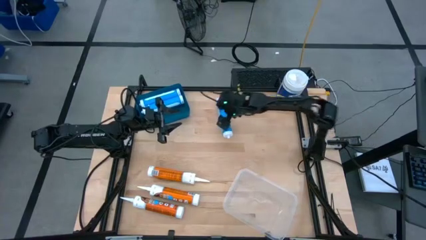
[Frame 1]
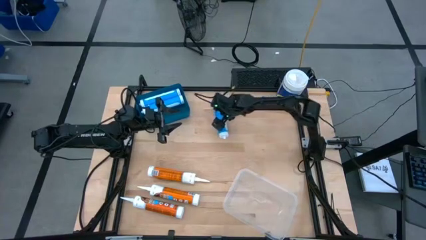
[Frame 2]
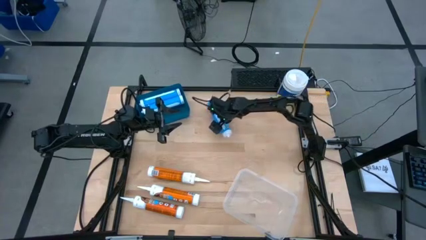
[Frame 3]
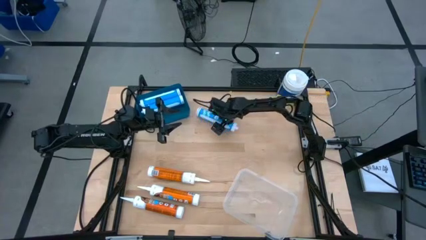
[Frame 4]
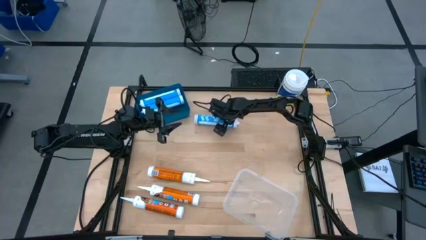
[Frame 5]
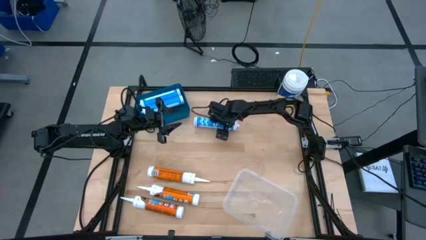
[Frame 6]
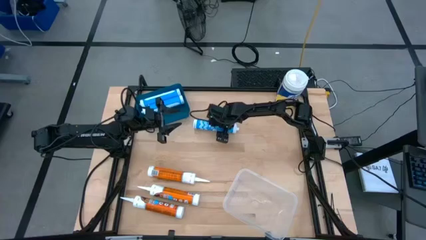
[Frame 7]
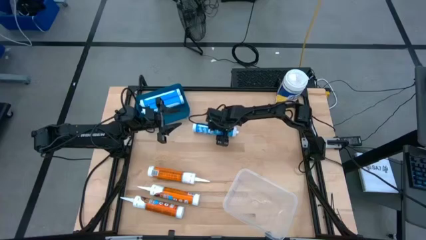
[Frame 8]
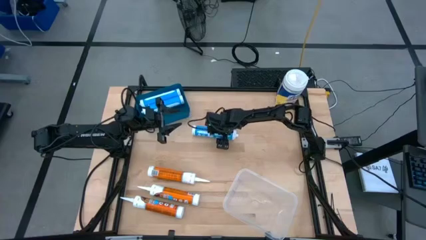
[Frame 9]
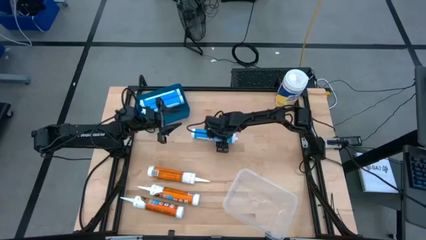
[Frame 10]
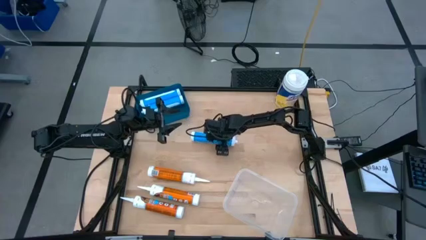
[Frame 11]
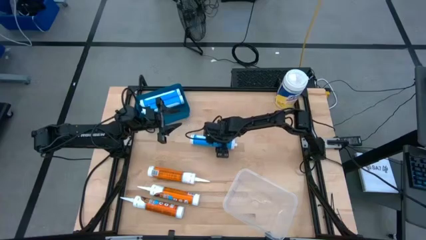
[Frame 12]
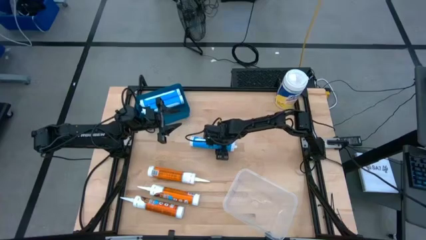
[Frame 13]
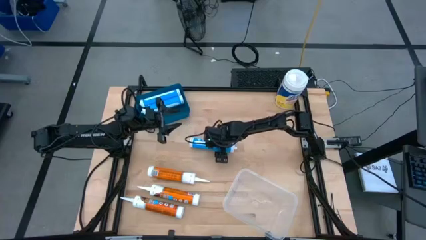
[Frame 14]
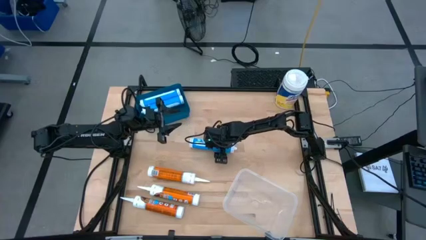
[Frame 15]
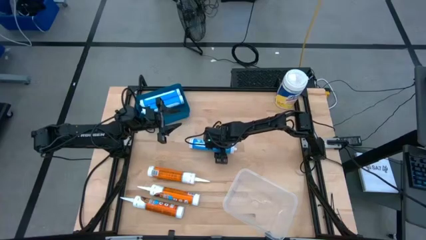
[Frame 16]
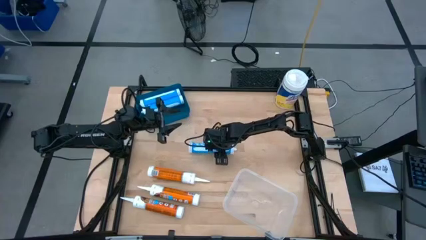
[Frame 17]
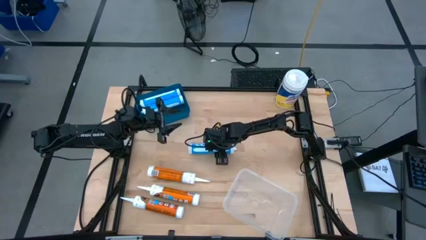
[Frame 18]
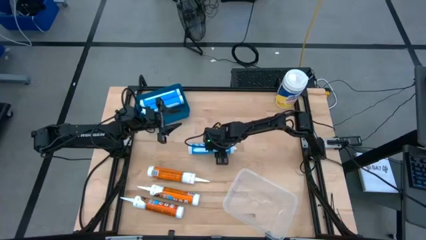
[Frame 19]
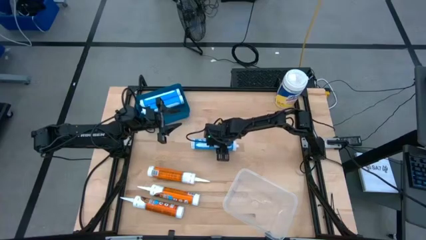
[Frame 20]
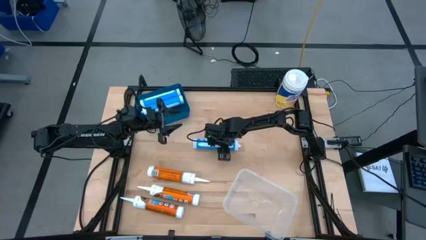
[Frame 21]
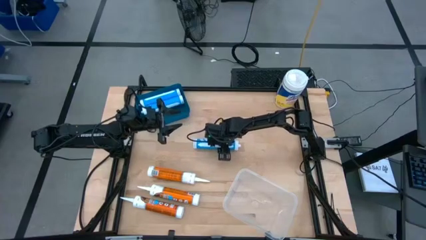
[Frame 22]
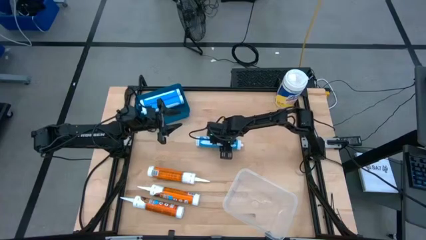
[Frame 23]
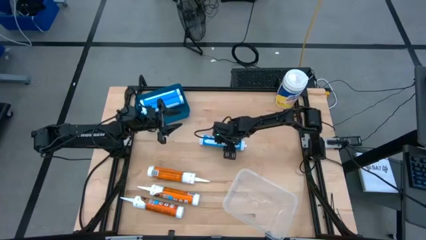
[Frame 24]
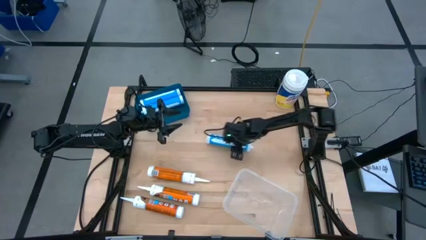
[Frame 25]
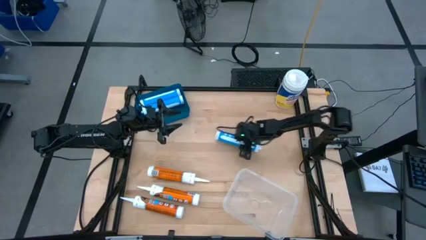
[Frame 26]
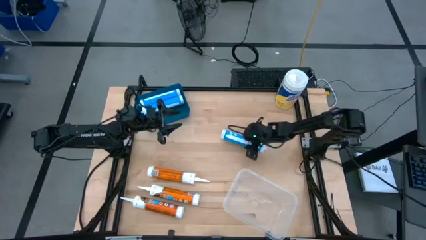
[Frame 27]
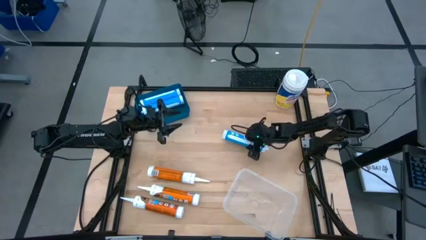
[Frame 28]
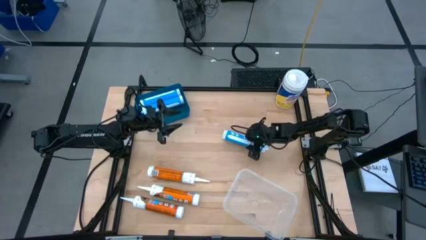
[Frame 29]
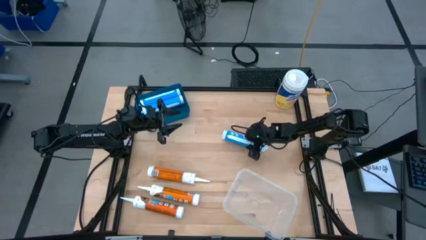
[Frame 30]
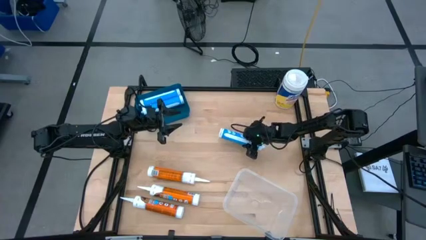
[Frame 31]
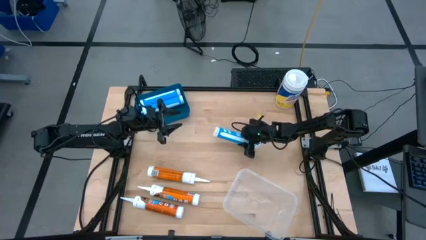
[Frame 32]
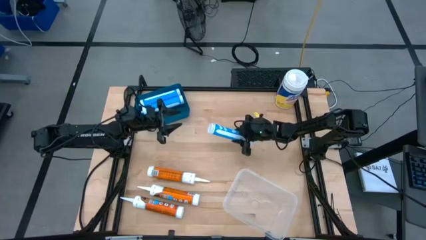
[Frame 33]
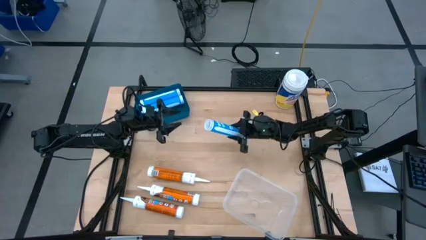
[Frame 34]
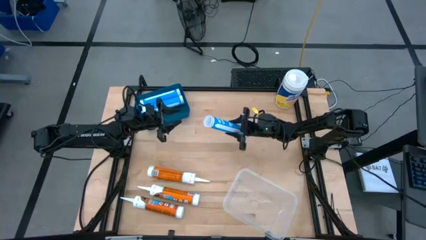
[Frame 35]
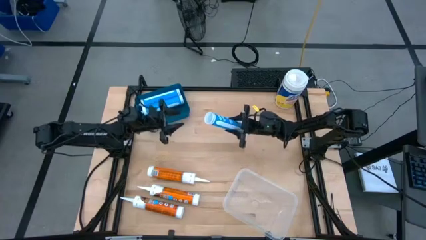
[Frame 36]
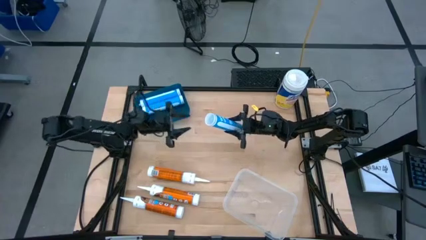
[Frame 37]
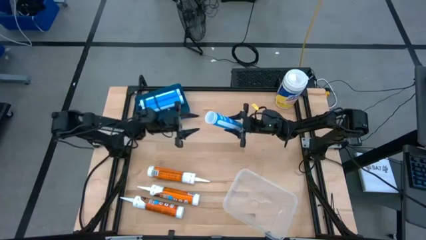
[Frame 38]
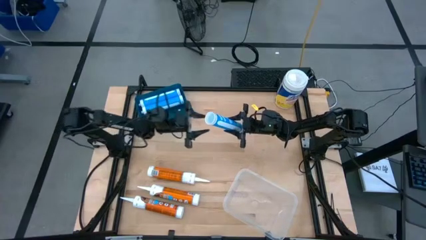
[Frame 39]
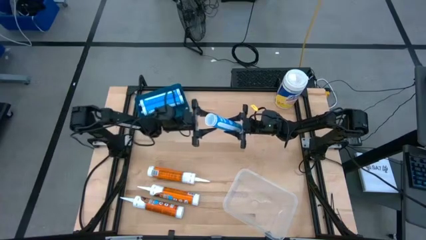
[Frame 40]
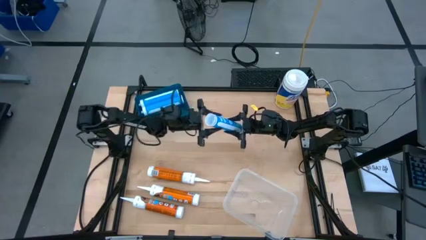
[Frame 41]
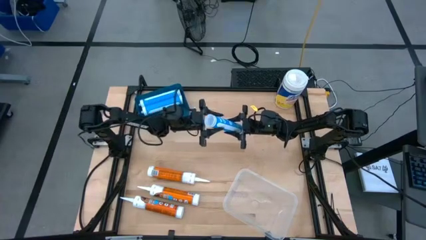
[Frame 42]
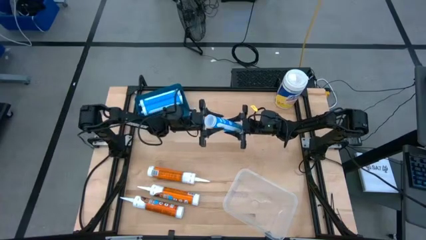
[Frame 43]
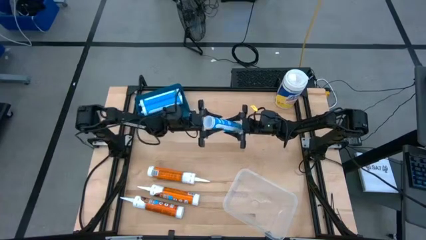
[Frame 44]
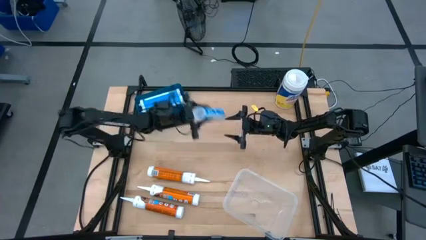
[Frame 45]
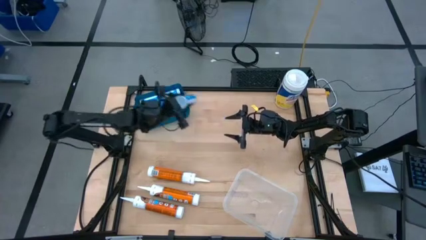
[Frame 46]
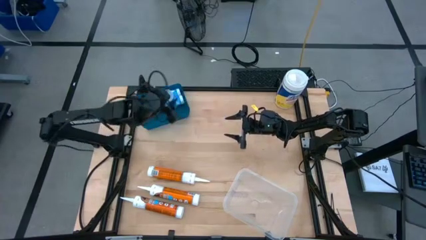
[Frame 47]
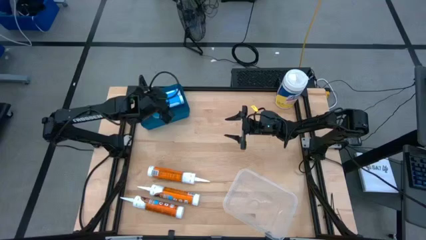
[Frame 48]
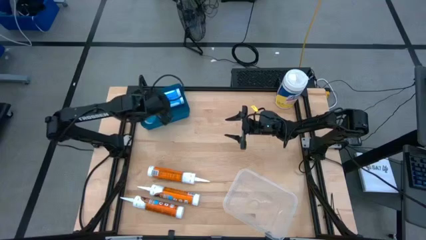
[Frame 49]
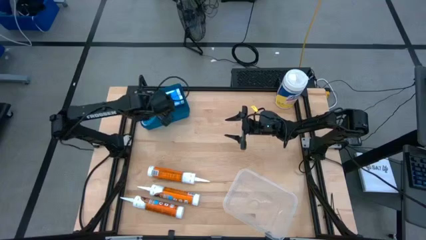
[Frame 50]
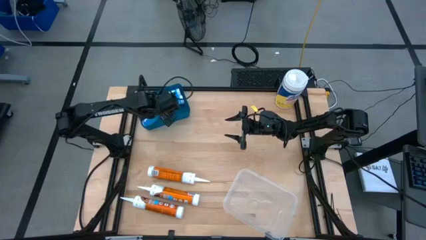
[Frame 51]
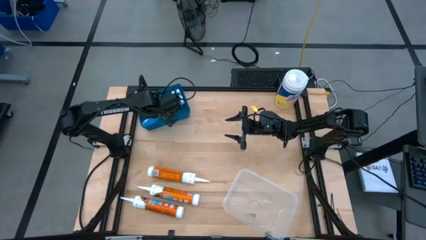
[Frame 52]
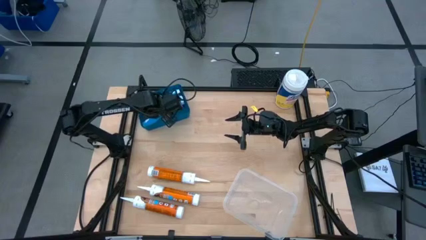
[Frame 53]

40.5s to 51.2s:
Task: Pick & place silicon tubes, Sealant and Lysol wipes
Put the blue sealant into the blue bin
